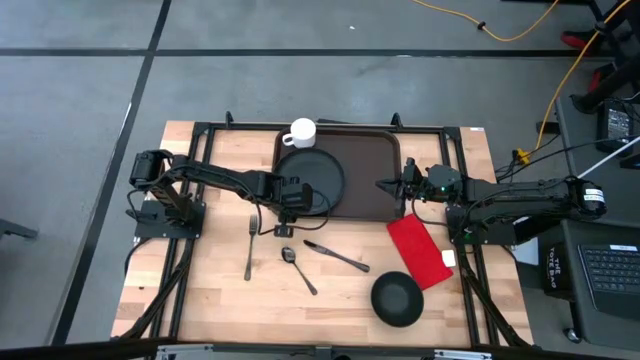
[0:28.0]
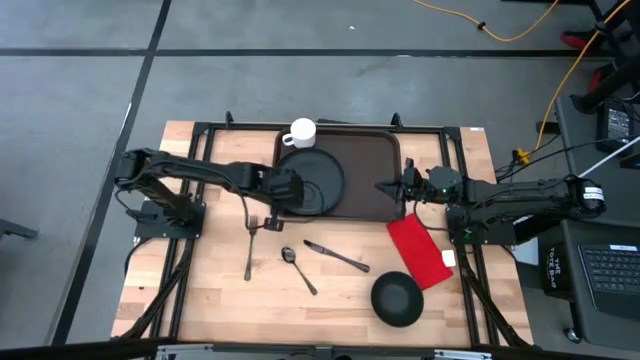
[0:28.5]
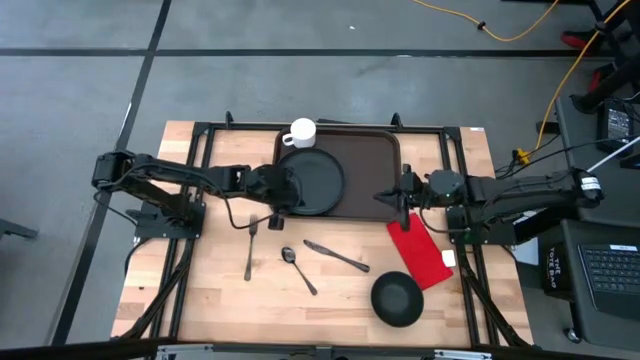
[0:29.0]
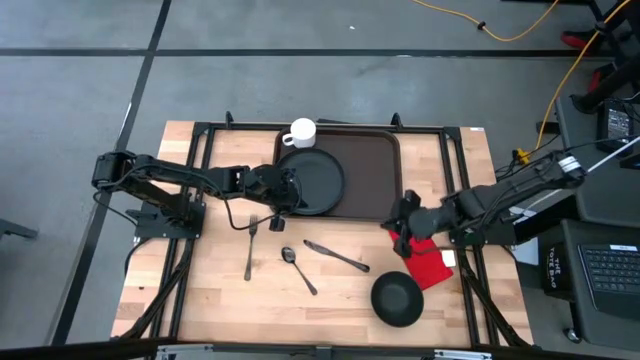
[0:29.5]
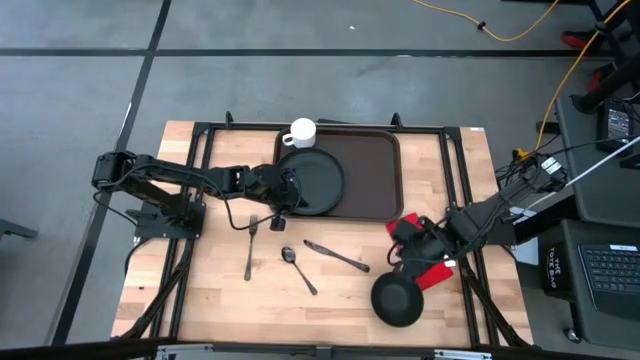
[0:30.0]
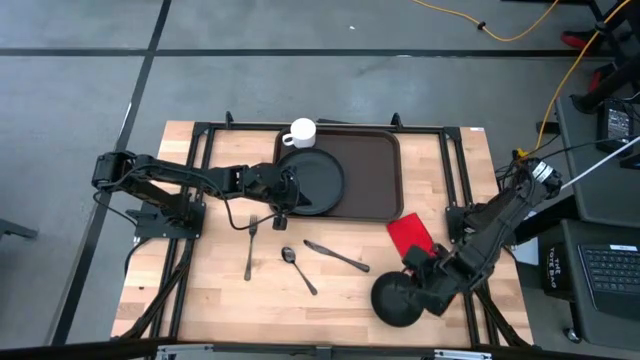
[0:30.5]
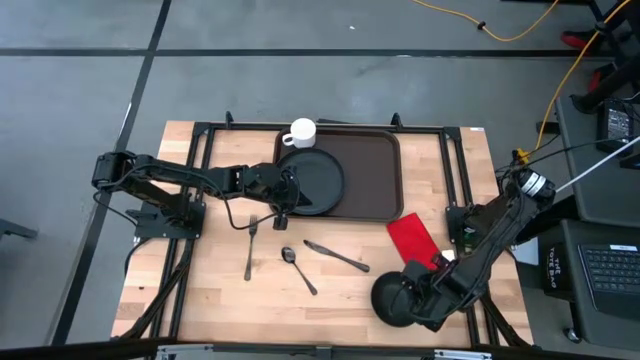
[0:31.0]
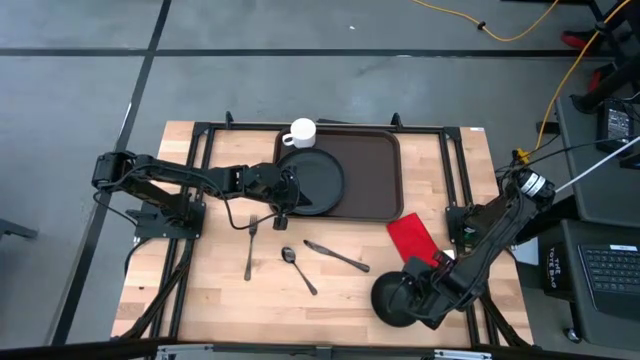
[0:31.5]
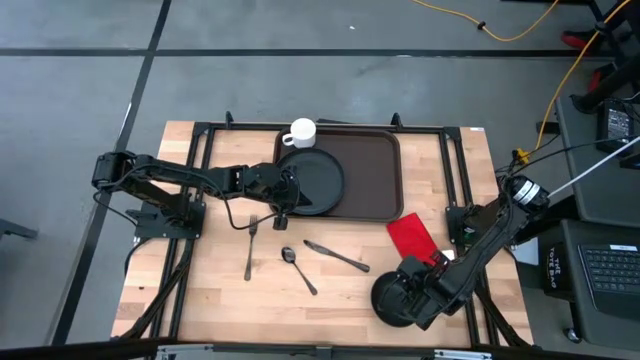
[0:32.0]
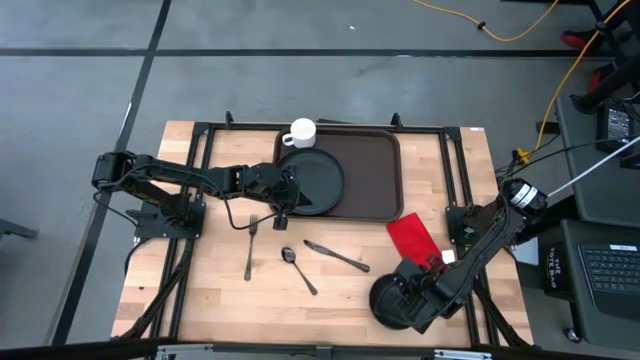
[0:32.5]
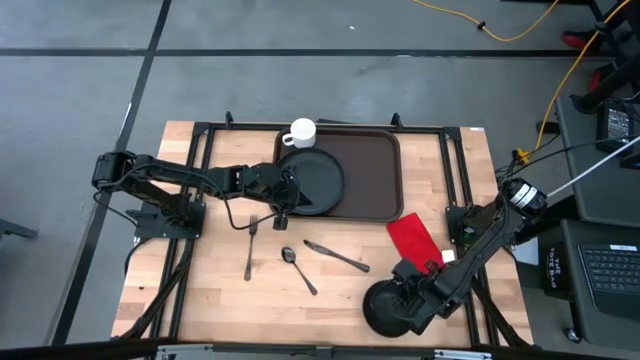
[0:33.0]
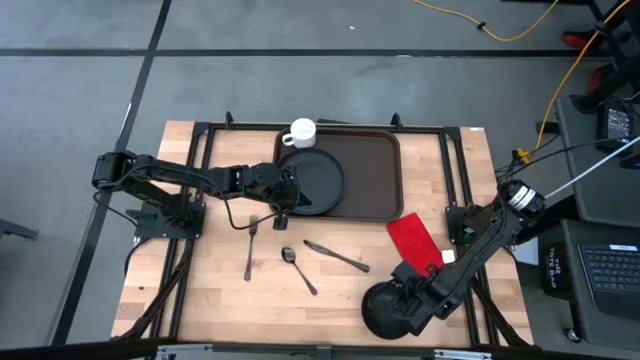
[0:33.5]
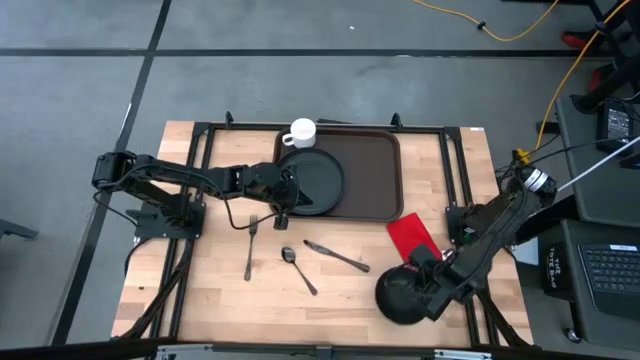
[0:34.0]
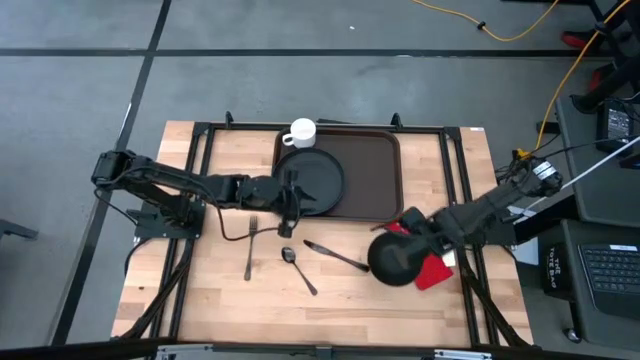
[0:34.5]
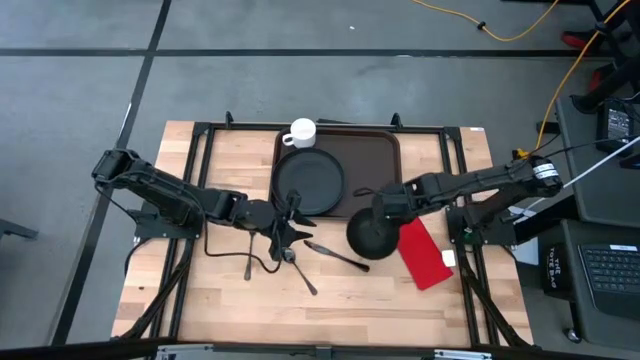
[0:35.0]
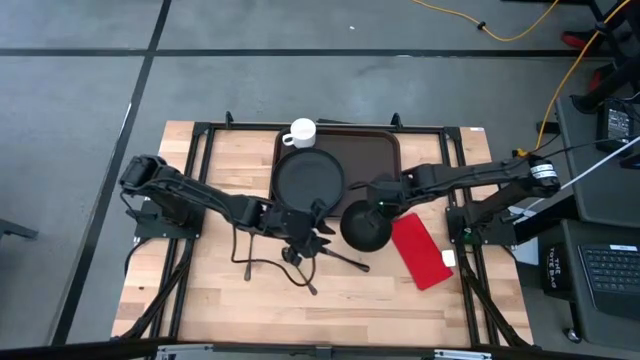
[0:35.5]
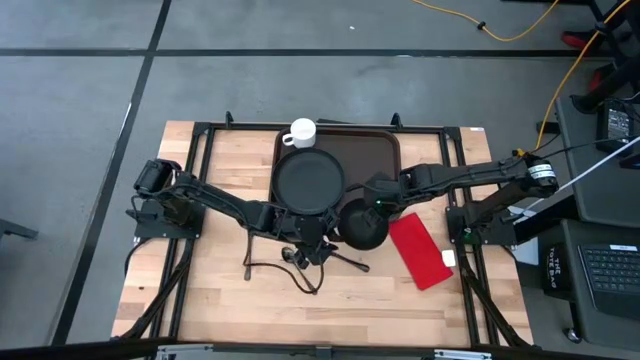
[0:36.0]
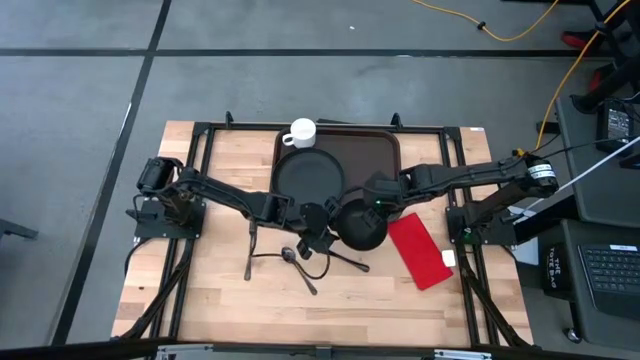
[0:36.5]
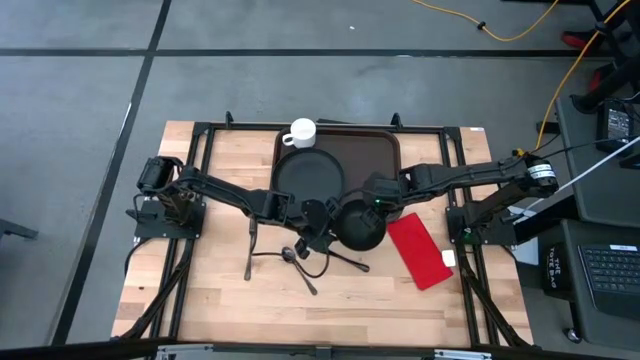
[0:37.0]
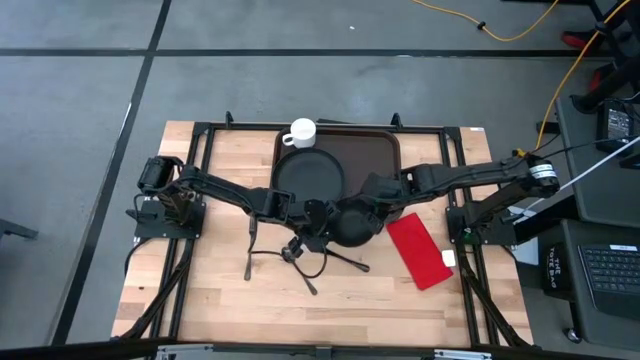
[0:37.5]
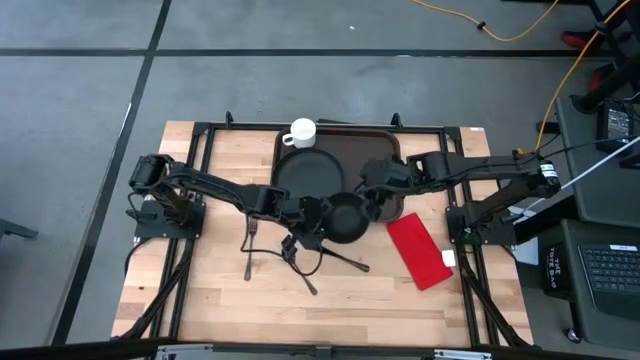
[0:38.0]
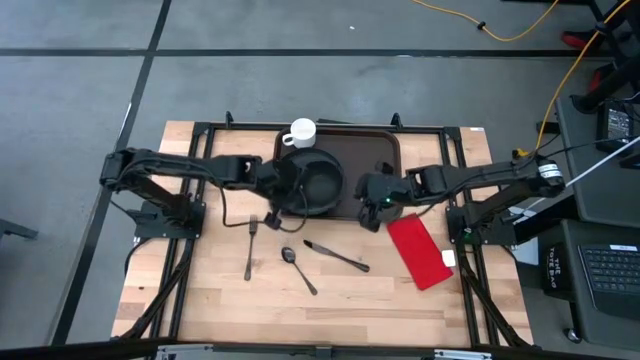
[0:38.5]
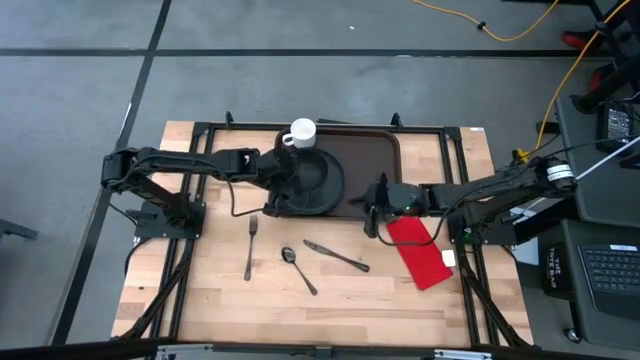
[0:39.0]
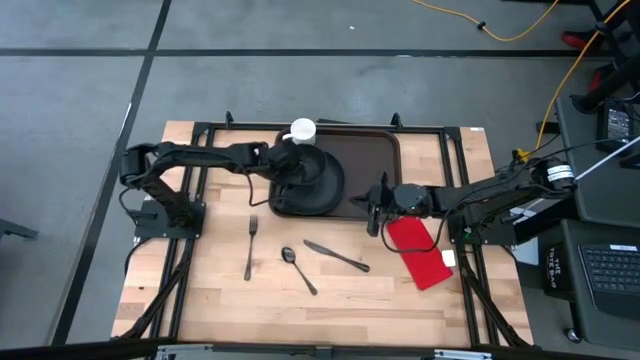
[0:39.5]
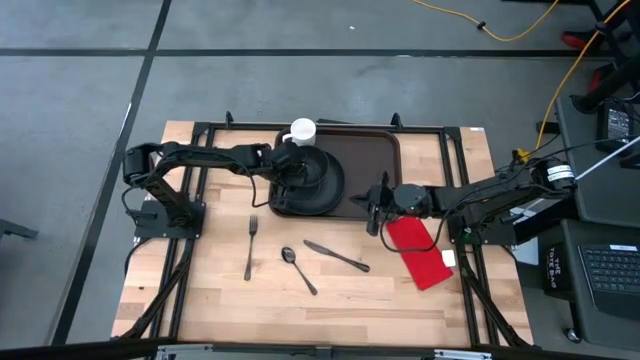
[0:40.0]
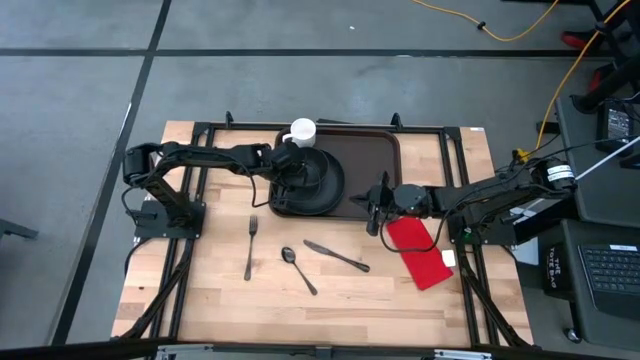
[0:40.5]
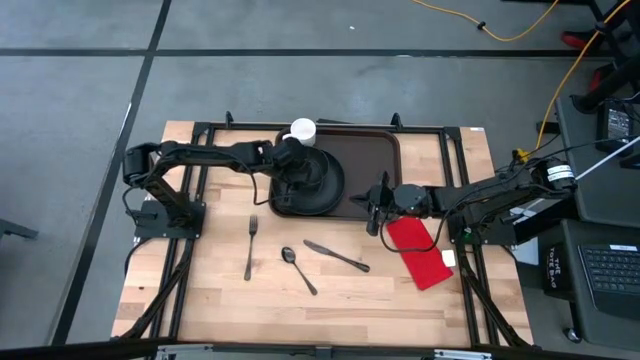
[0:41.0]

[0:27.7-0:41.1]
Task: Set up tray
Put the black bowl on top of the black plate on the brown serving tray
